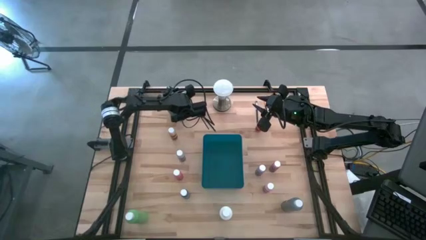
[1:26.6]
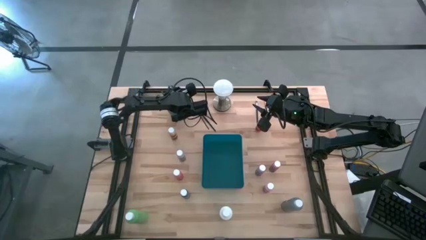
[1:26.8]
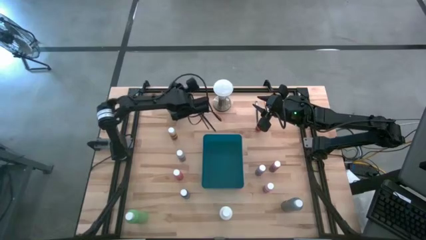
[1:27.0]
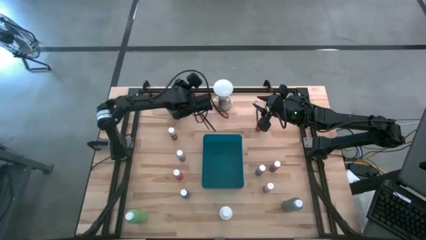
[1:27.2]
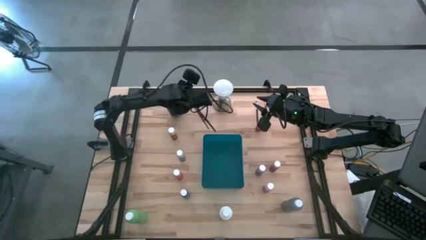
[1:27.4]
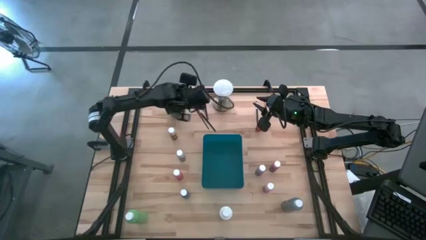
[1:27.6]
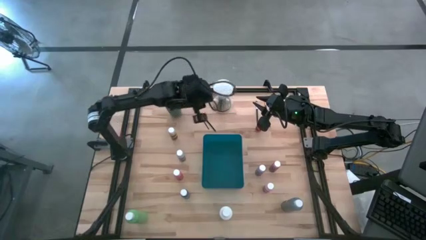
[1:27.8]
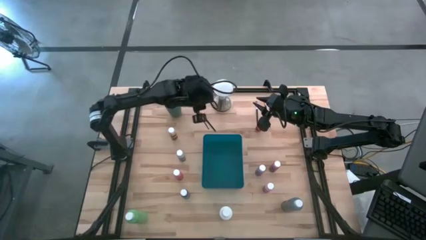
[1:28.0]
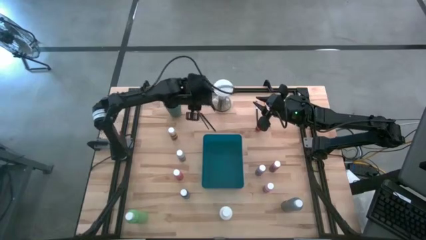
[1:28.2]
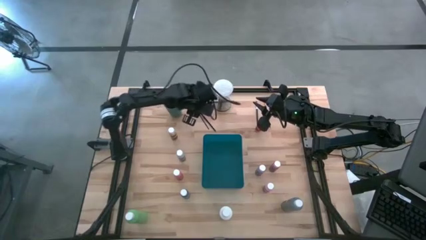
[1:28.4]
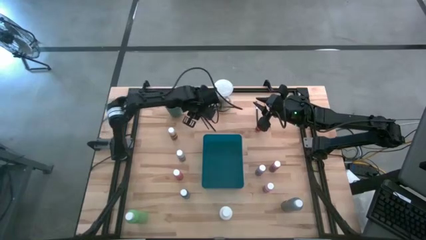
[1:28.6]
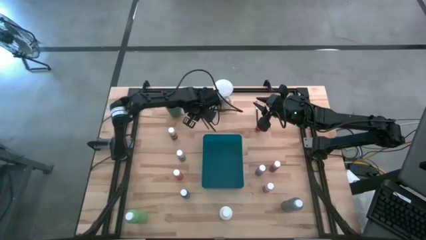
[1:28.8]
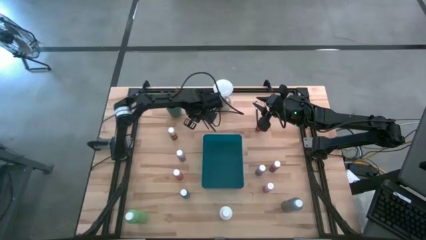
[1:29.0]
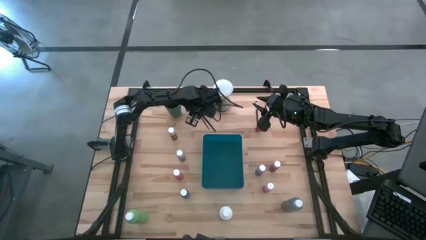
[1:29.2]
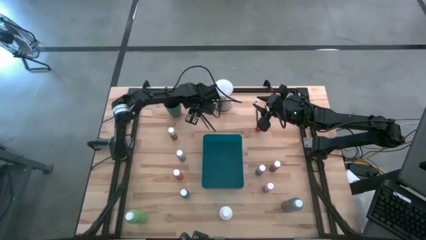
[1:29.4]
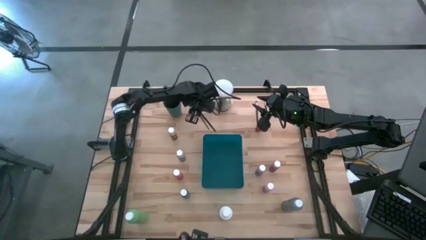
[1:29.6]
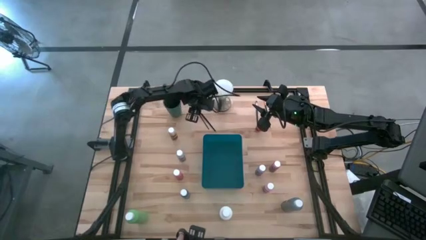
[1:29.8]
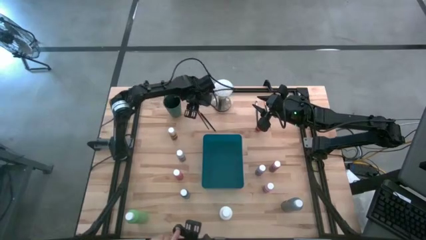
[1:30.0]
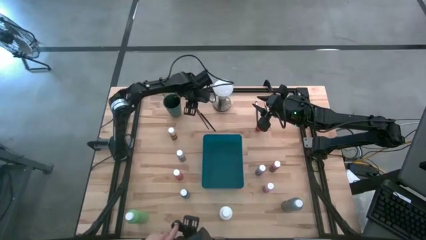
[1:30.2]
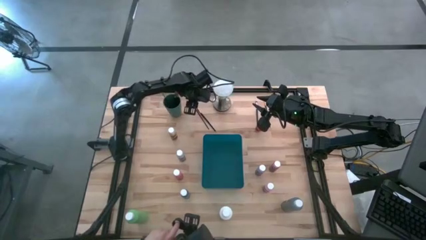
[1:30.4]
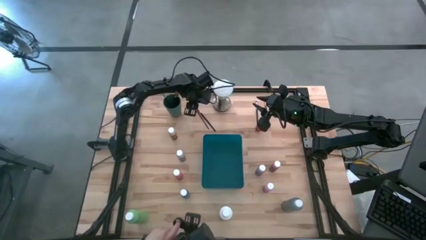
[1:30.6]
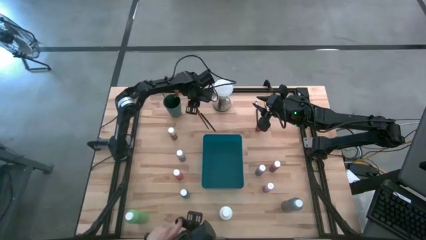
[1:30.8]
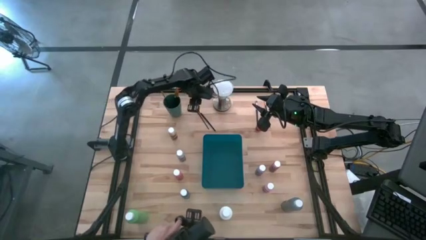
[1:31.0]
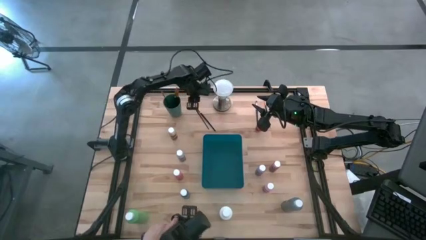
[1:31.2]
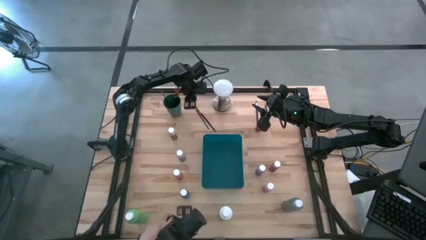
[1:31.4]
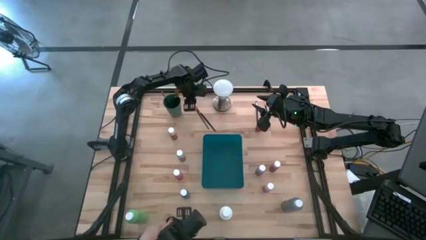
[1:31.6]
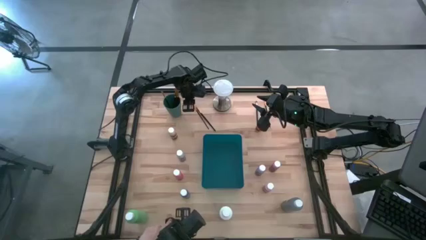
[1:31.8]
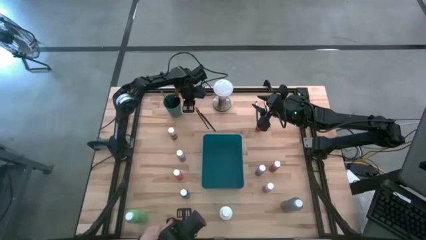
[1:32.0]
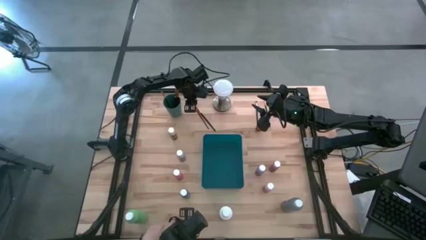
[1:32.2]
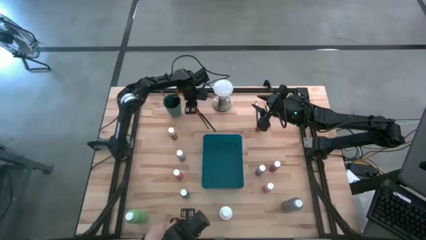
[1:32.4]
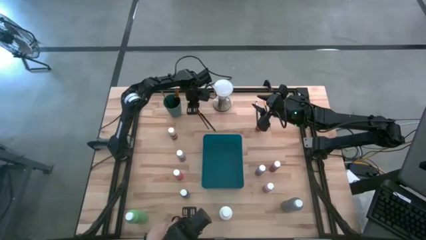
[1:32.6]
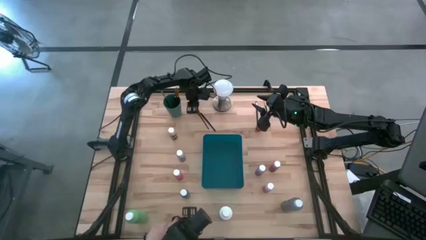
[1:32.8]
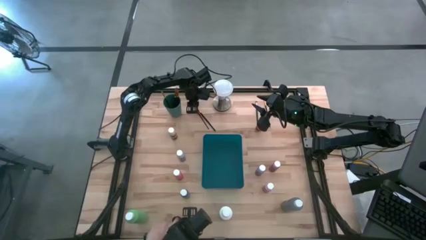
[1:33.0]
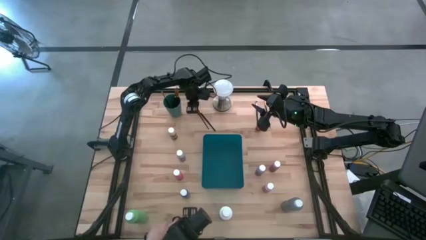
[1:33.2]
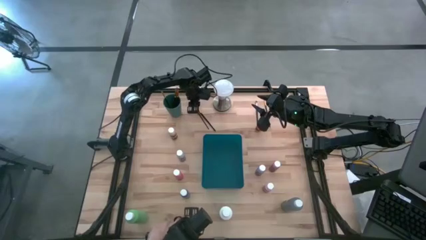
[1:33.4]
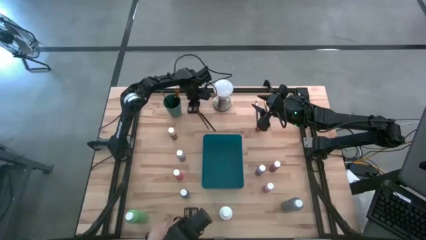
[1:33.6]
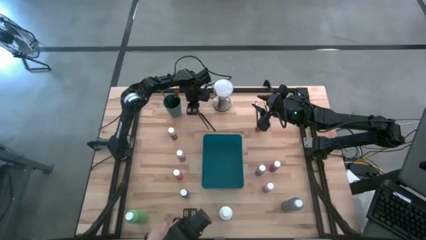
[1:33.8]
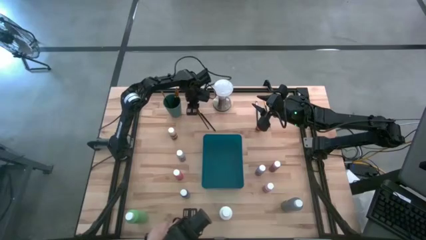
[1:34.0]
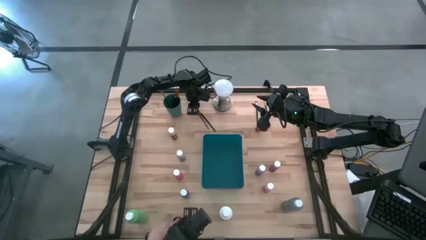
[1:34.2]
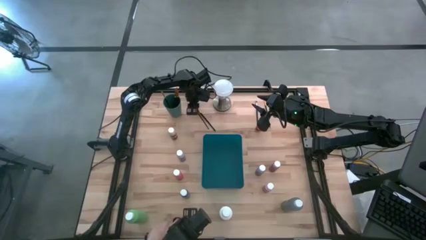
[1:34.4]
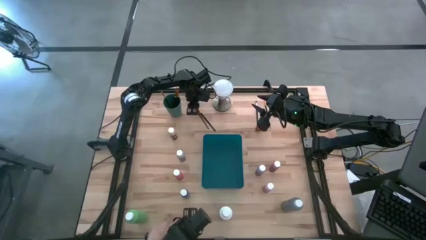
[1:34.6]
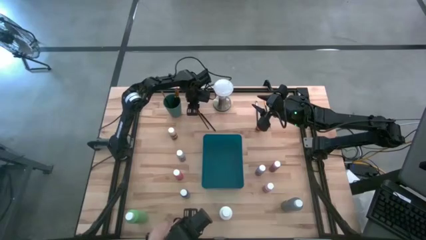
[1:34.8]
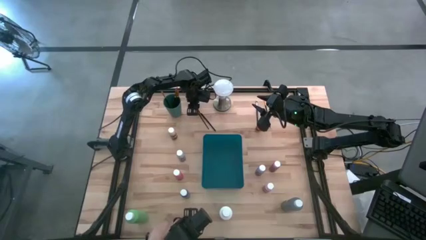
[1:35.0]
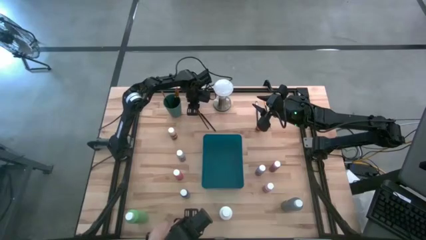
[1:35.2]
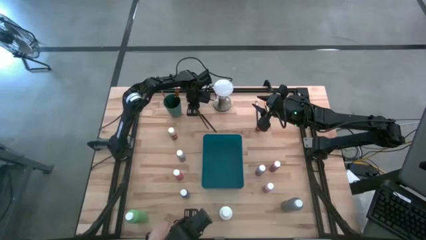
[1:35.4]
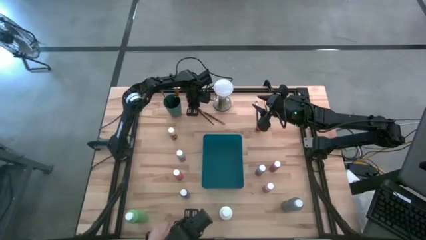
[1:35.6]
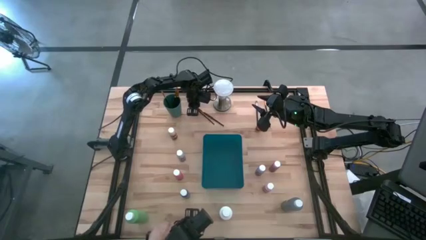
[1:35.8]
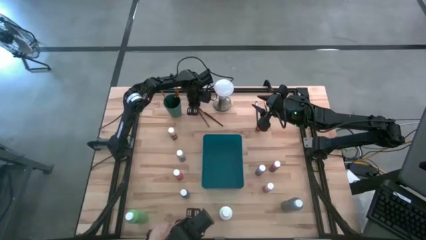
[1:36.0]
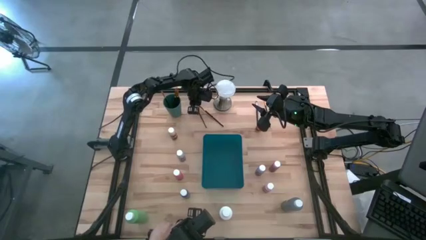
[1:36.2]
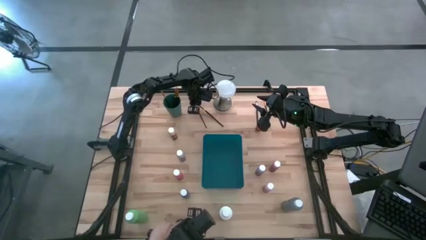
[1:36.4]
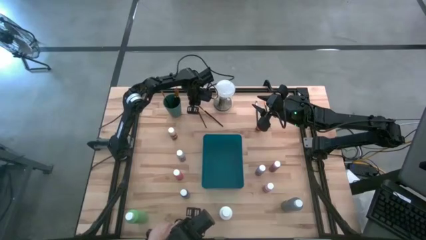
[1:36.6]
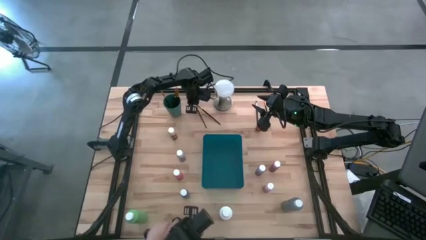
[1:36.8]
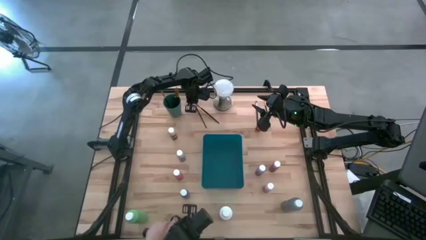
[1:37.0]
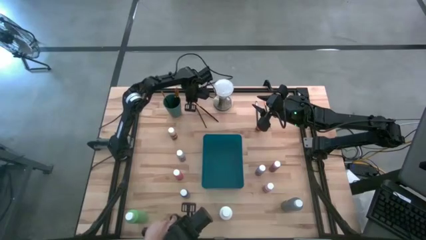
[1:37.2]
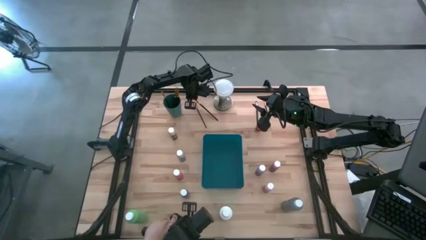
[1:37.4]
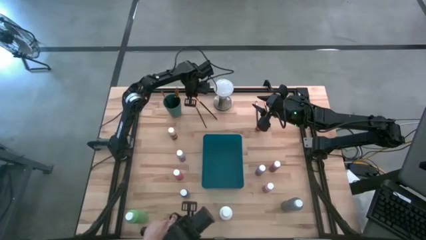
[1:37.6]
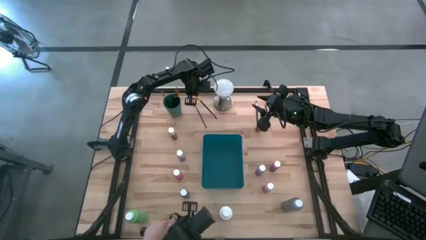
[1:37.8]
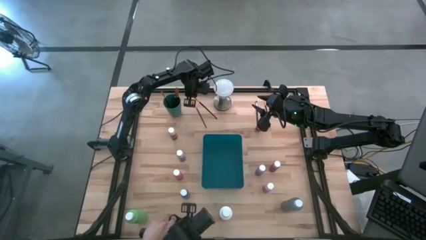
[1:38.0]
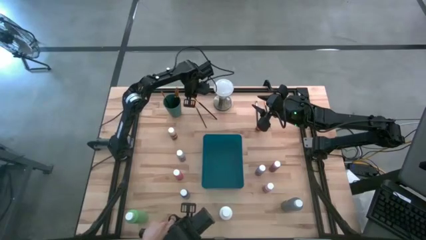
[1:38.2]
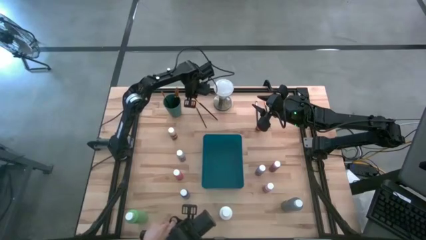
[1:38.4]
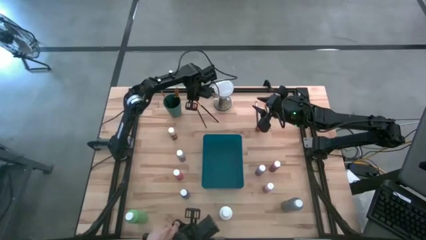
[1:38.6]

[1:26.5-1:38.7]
Task: Pick & Place Paint Supplies
Put the yellow paint brush into the green cup

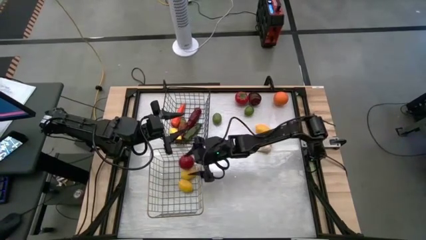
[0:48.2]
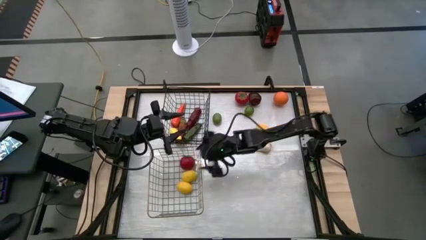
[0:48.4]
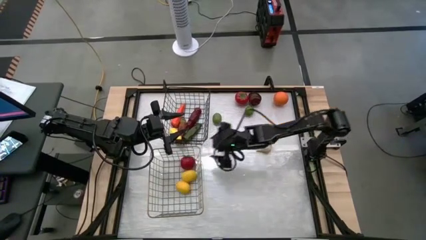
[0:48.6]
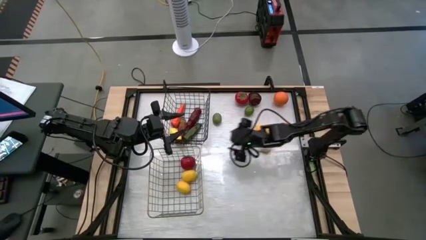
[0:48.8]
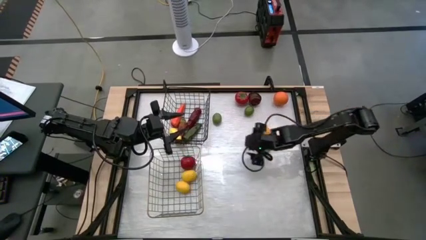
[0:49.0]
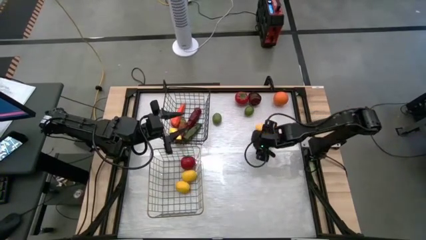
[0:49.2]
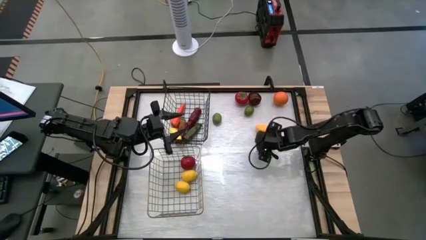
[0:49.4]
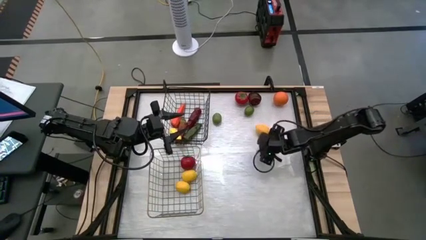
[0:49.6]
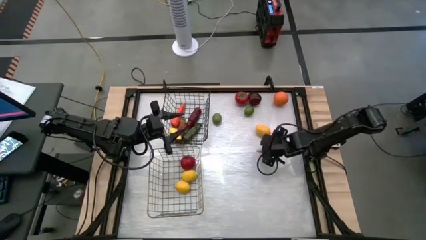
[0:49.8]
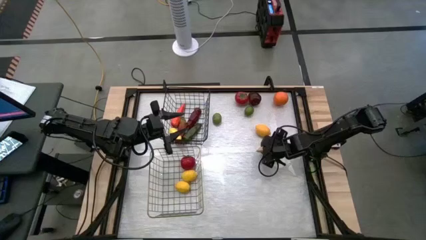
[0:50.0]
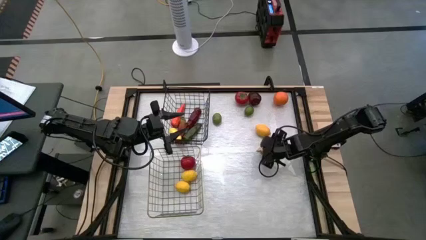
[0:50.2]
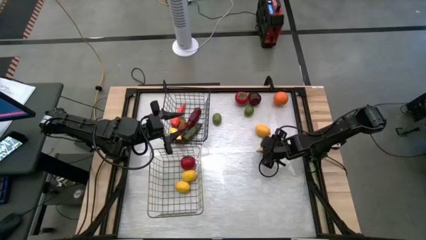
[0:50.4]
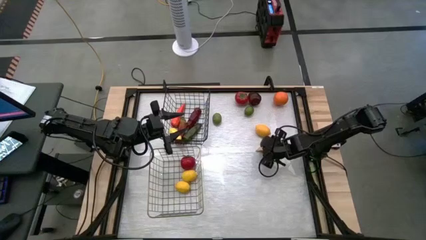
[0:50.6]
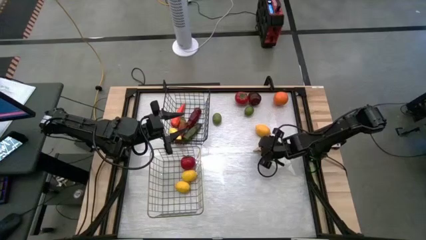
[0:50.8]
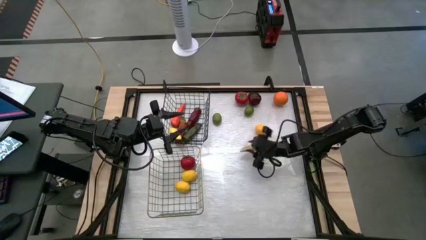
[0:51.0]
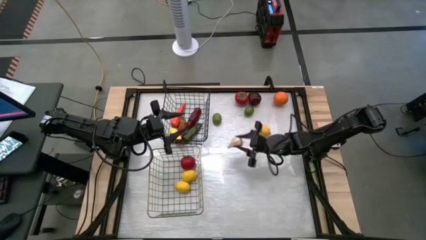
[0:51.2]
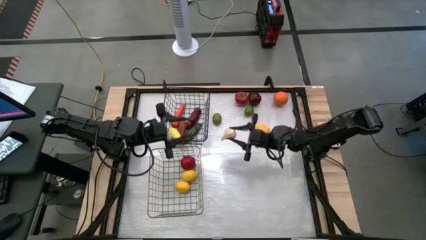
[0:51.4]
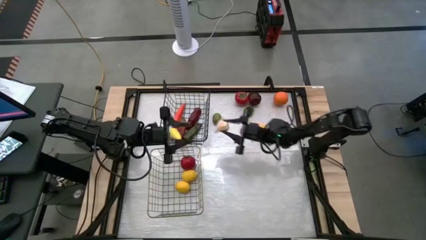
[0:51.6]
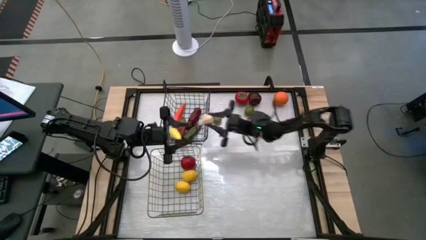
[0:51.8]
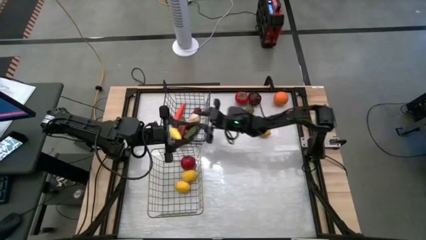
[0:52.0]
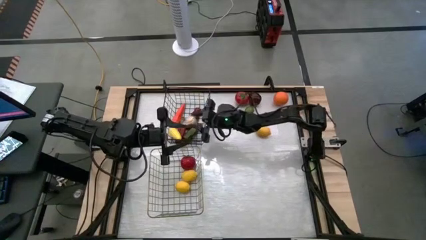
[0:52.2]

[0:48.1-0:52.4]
Task: Sort produce into baskets
Put the white garlic into the black wire basket
